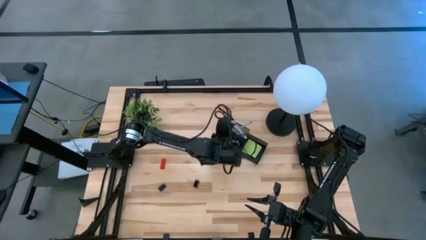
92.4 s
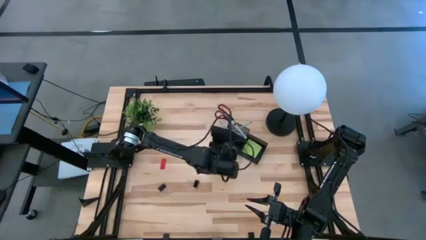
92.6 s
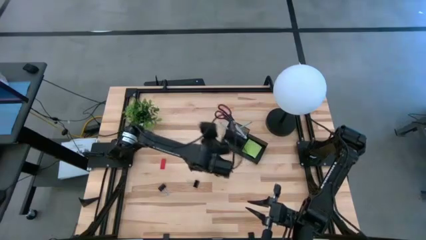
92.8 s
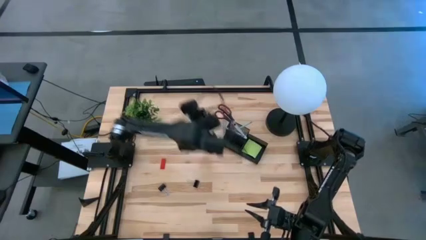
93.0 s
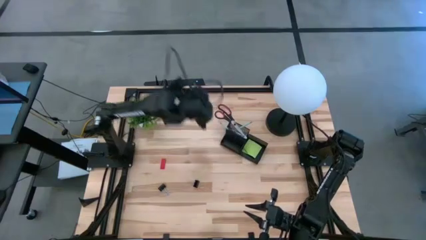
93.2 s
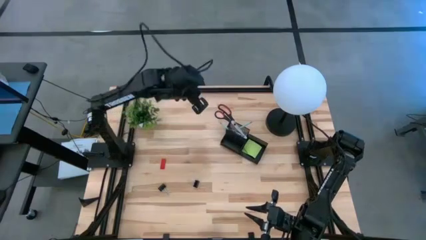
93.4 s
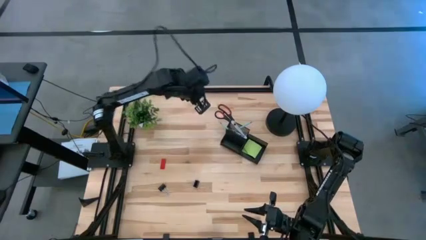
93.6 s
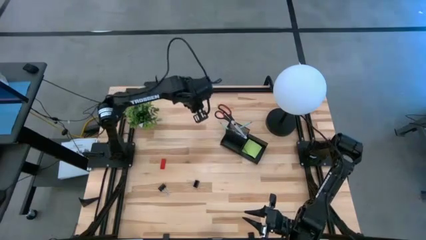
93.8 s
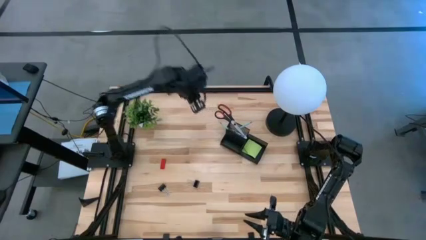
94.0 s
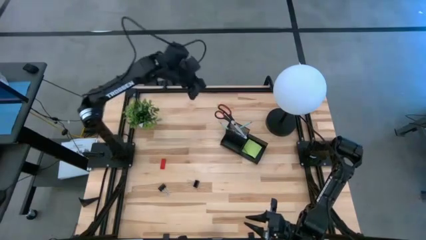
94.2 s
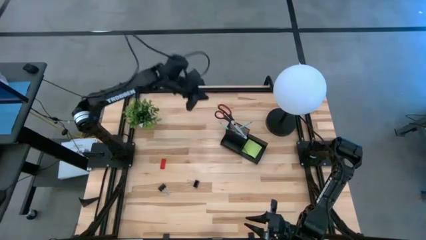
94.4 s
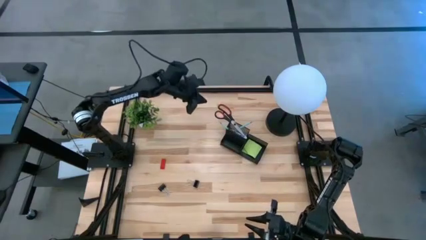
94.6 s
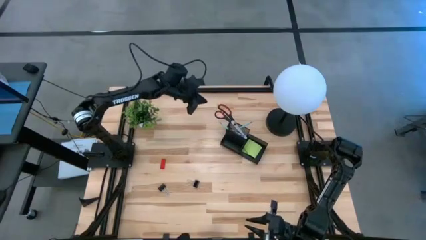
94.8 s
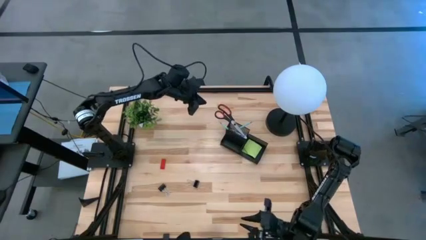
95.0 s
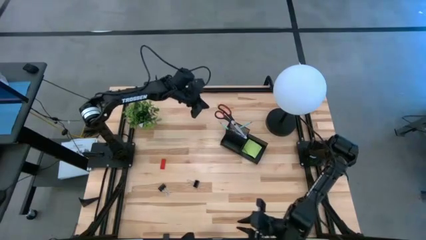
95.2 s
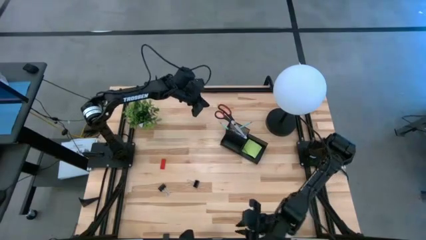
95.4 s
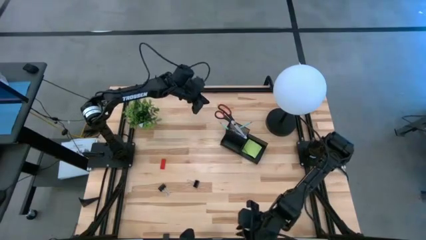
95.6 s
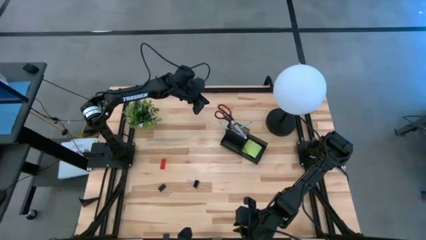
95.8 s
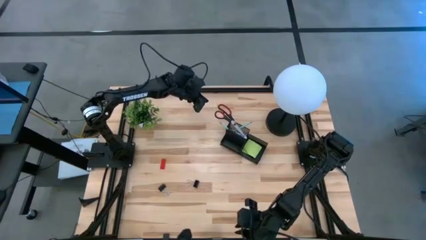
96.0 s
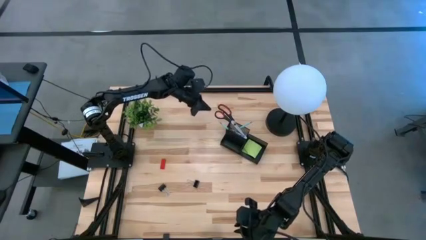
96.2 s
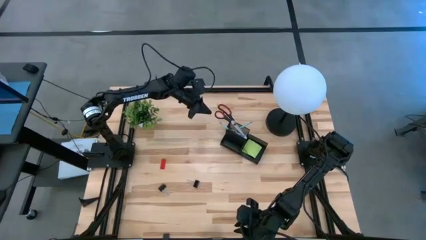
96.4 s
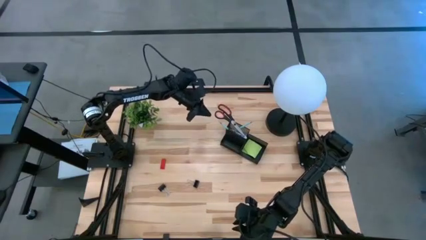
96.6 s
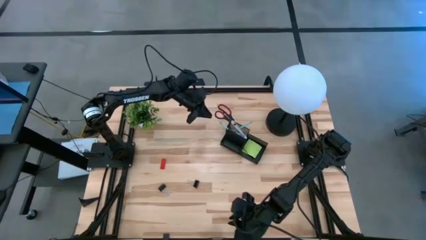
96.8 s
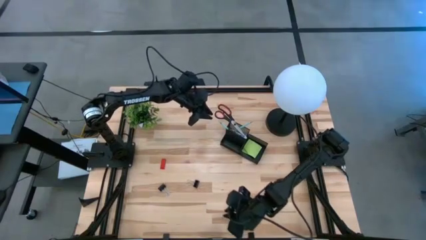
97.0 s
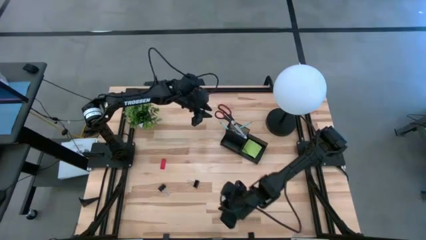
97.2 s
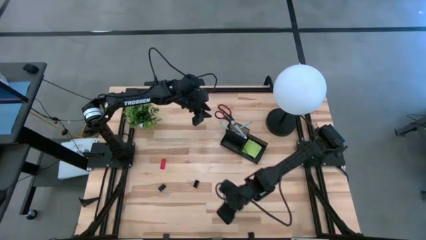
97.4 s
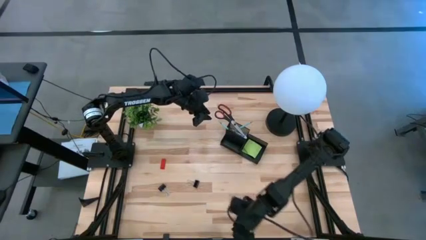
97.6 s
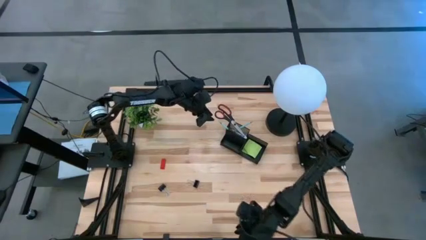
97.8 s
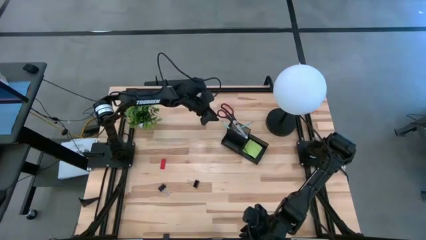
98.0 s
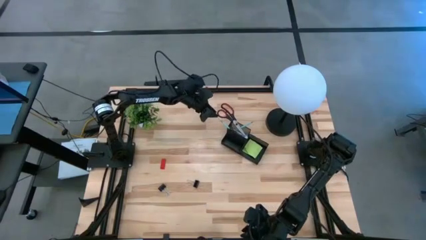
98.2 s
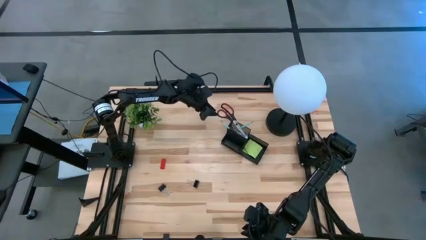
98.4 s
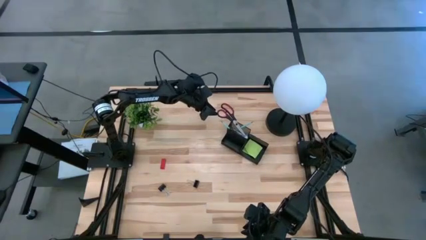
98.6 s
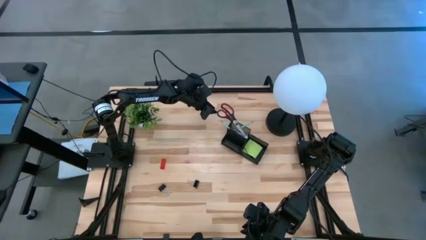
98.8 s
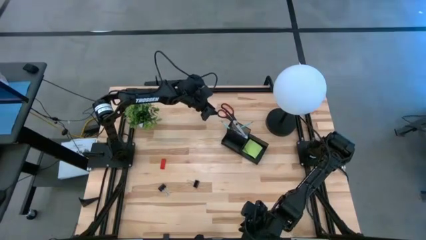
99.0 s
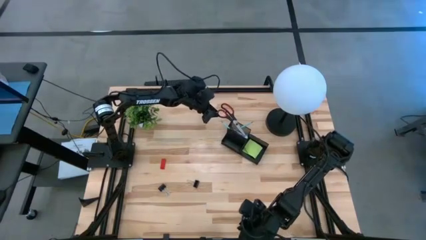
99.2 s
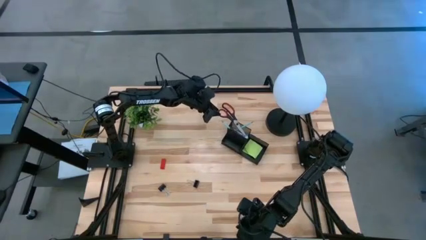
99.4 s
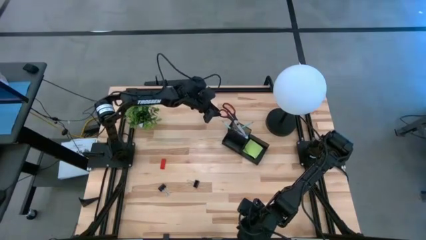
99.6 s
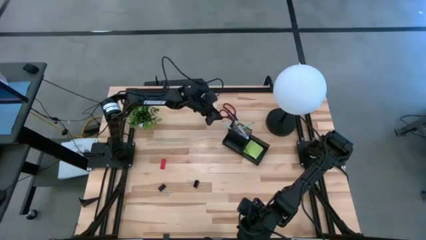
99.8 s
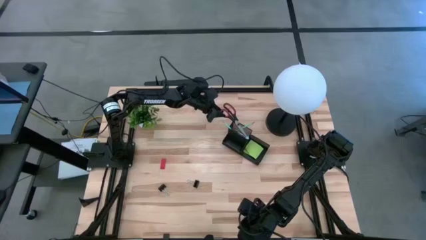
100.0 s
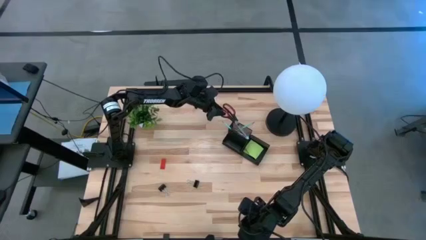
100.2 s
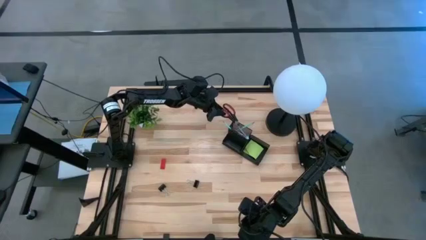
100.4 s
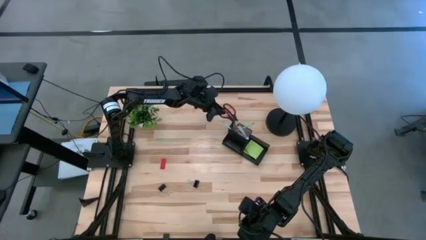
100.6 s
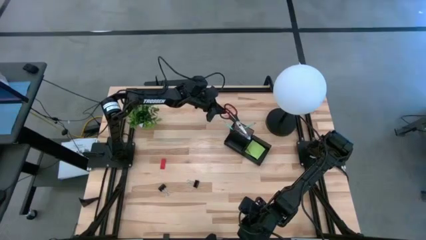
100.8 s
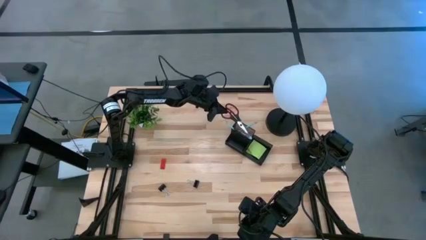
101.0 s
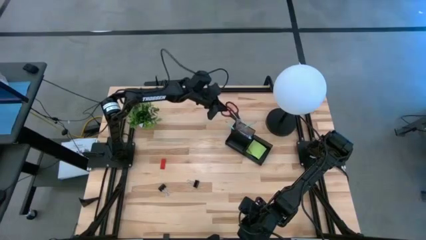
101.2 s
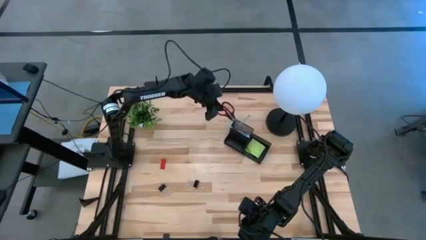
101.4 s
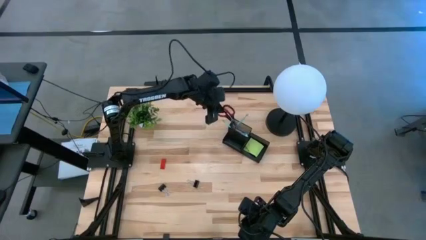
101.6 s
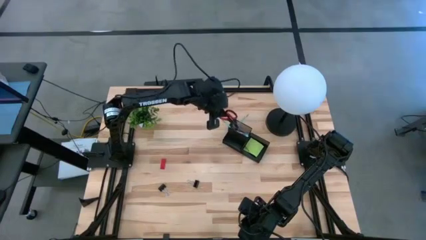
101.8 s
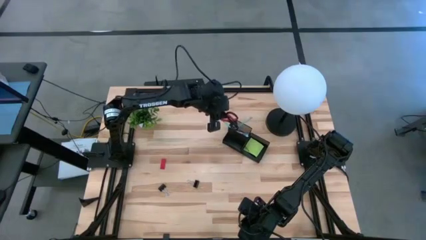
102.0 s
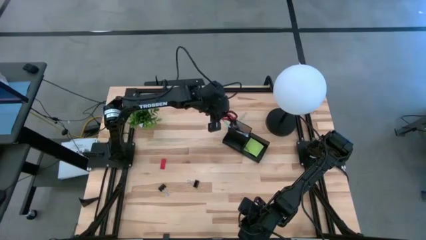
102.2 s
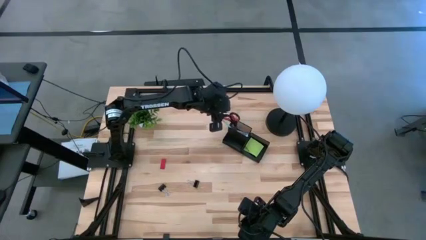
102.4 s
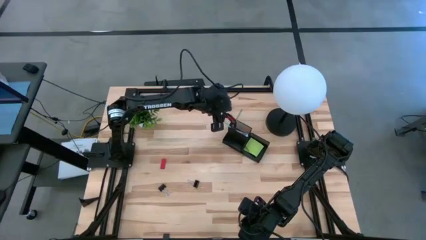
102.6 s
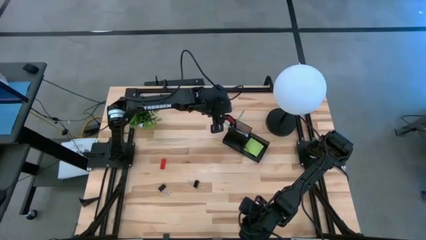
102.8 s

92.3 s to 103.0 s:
Task: Pick and place office supplies into organizer
Put the black scissors into the desk organizer

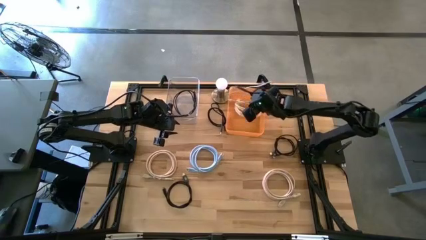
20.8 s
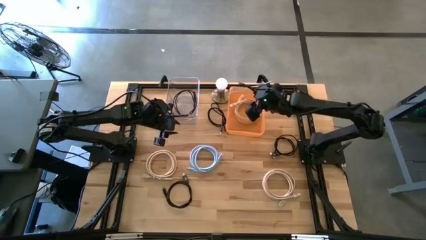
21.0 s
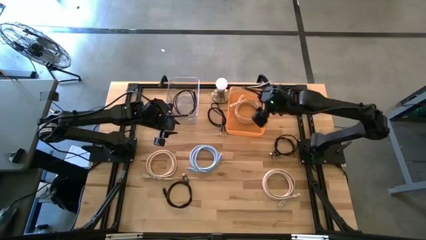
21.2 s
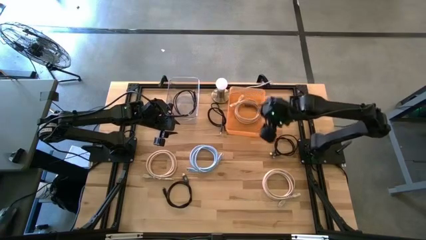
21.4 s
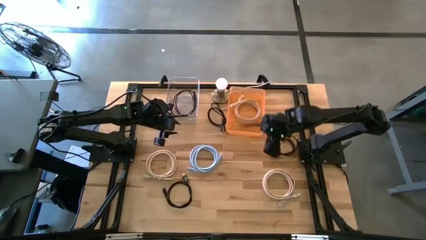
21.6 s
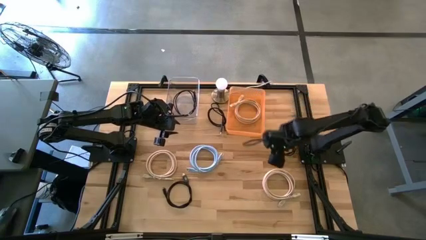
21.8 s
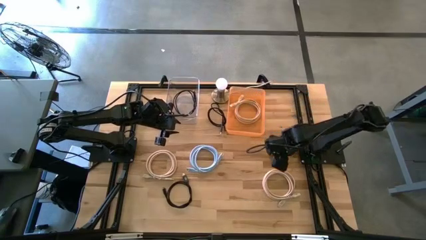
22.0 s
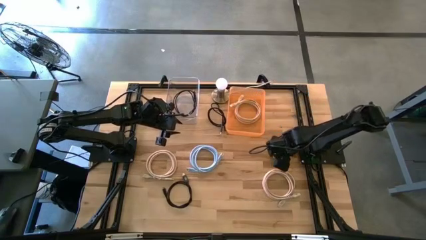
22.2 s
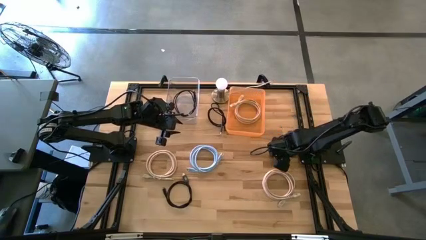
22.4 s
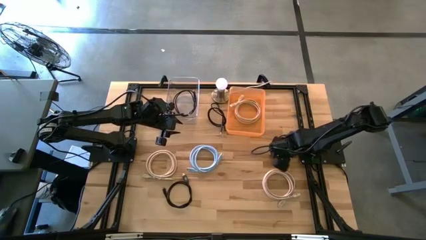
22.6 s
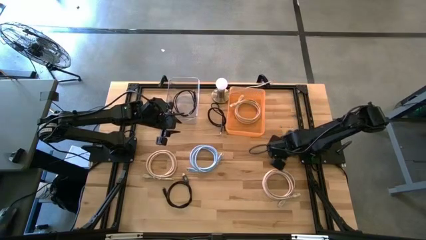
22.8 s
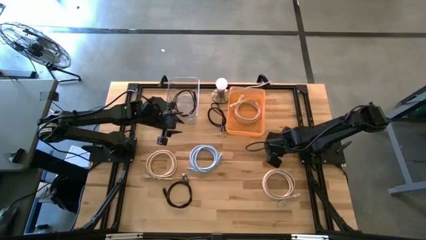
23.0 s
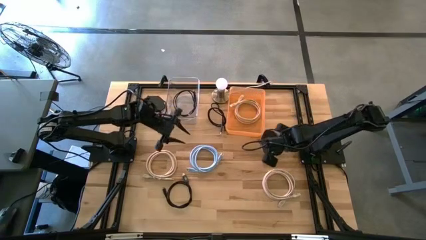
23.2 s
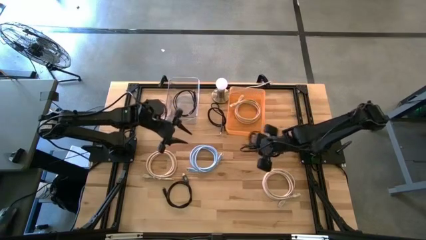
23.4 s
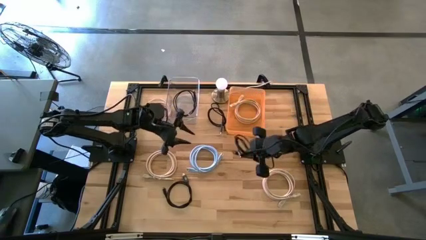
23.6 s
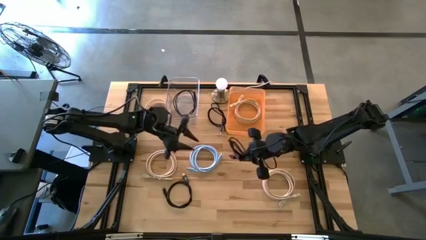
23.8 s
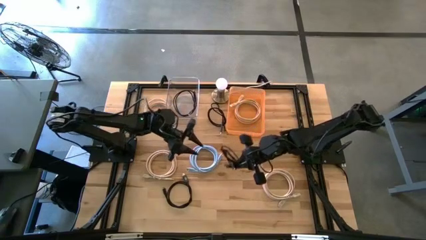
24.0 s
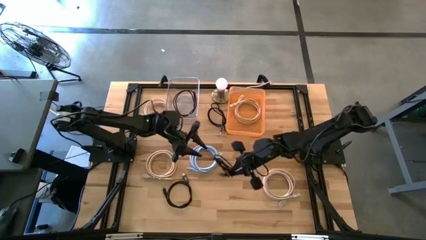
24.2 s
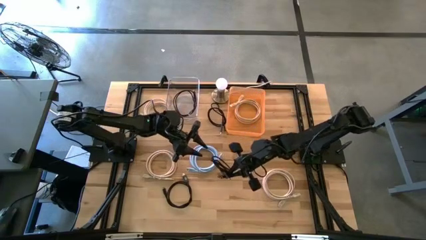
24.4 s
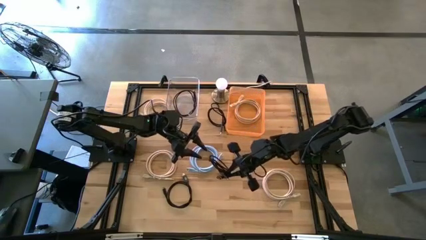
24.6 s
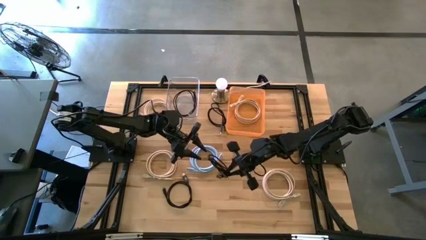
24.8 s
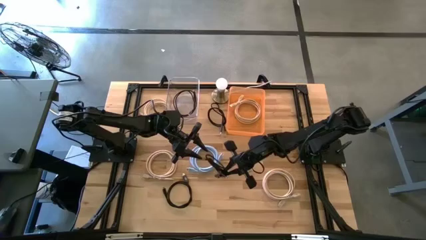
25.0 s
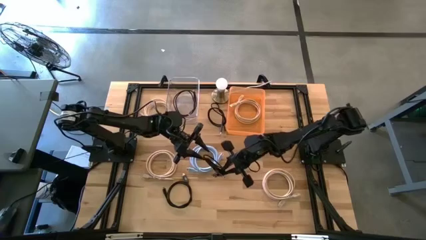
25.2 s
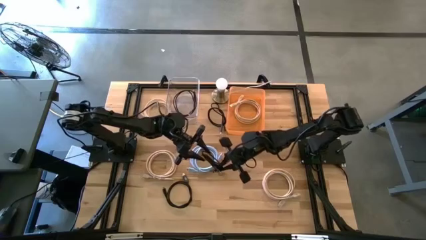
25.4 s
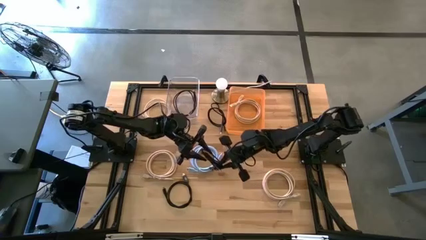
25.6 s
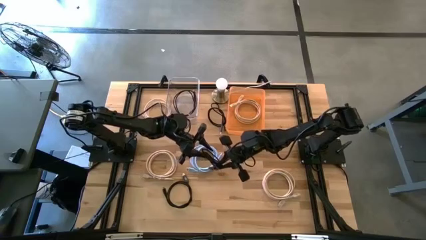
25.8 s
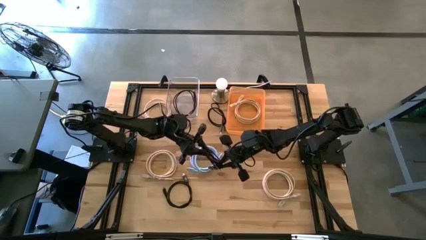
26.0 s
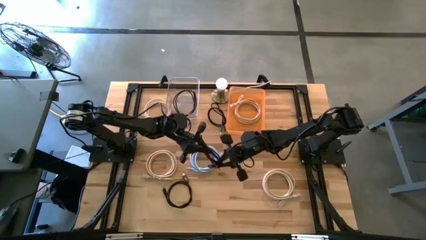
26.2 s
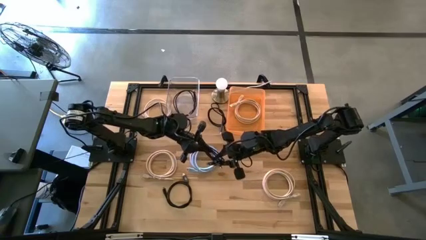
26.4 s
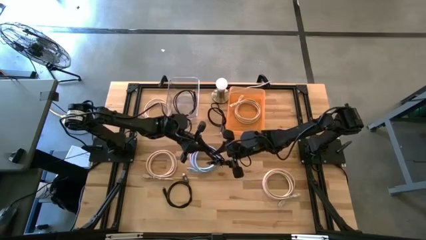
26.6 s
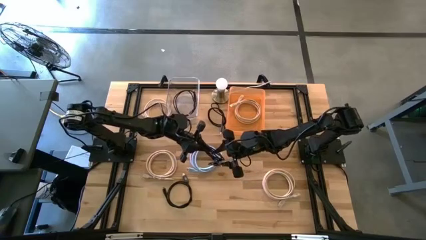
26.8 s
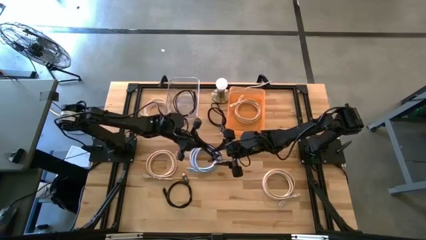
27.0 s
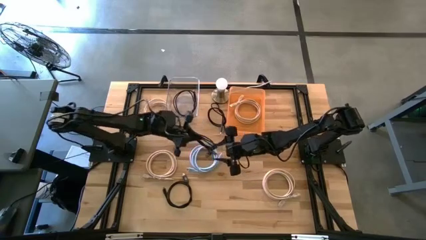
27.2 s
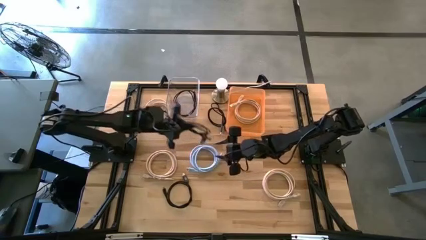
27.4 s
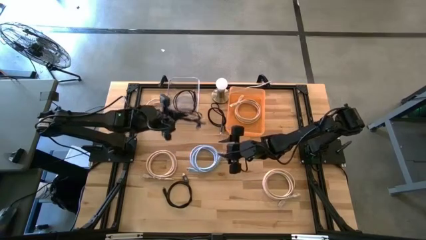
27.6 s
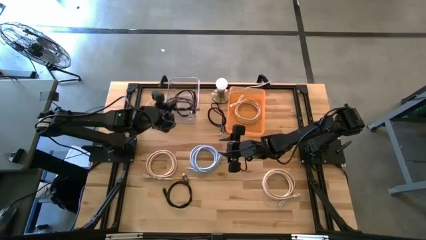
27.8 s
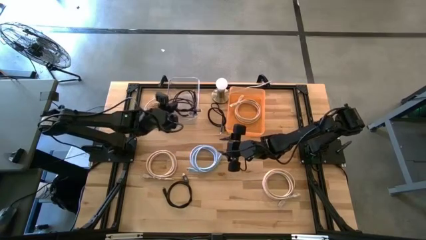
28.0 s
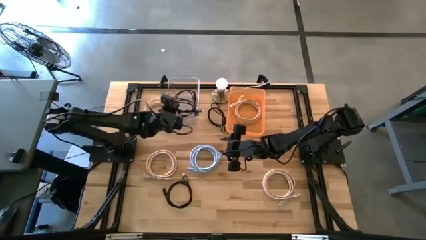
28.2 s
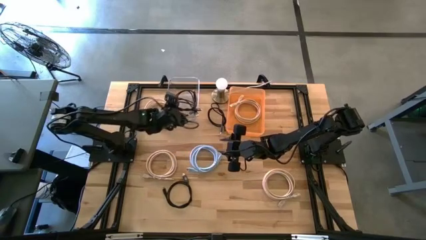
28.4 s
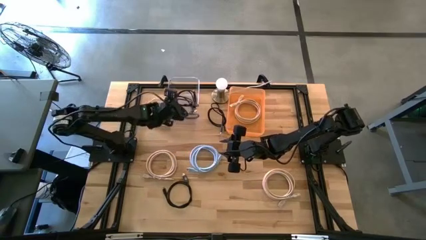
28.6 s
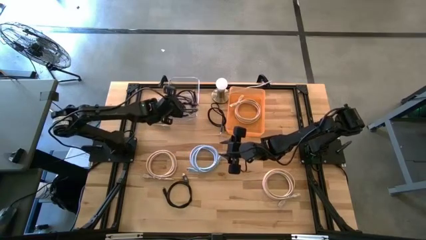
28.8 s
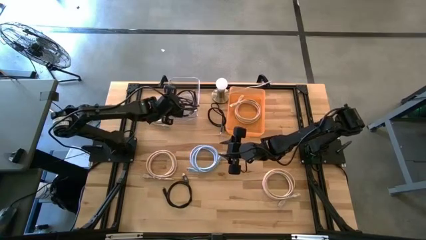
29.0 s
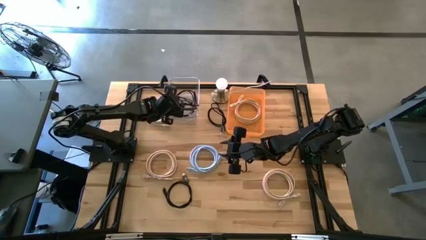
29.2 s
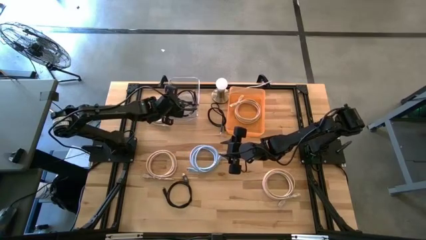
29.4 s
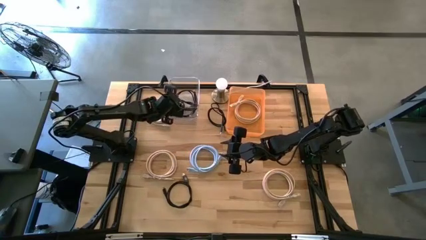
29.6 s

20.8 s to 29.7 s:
Task: Pick & Place USB Port
Put the black charger cable into the transparent bin
